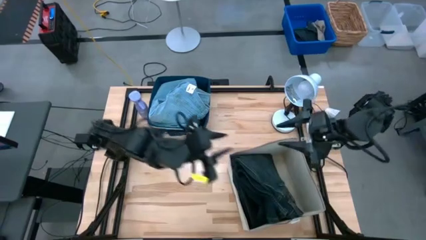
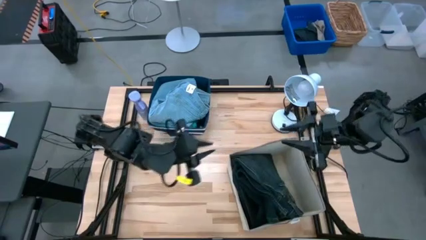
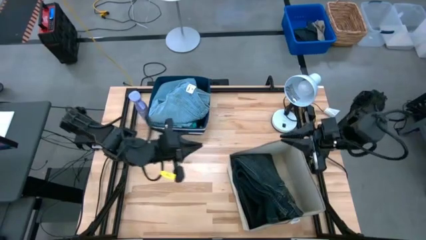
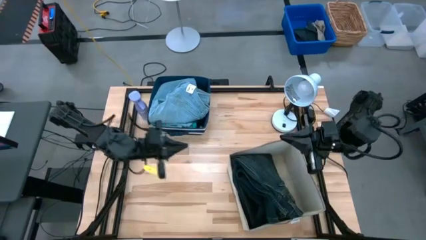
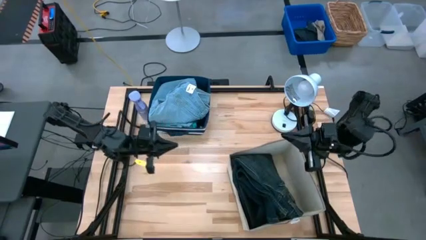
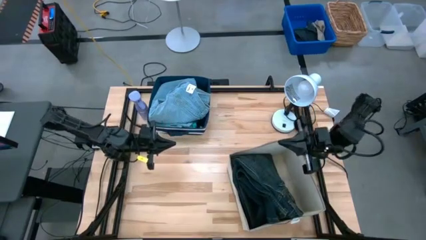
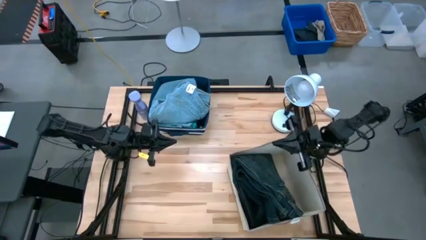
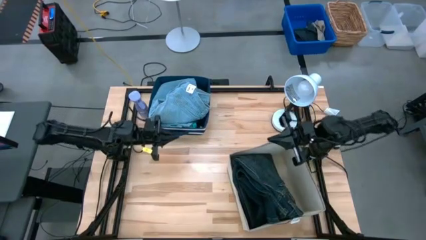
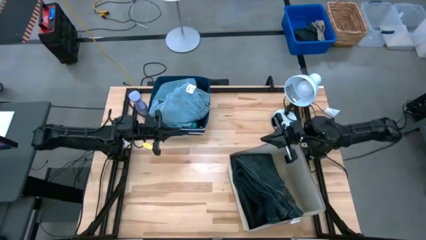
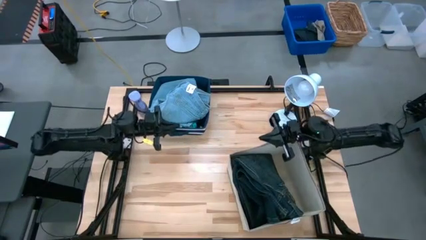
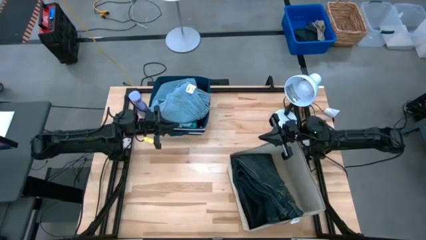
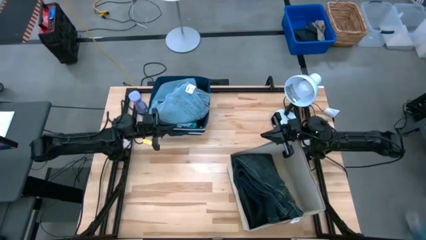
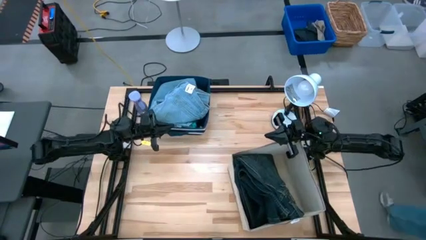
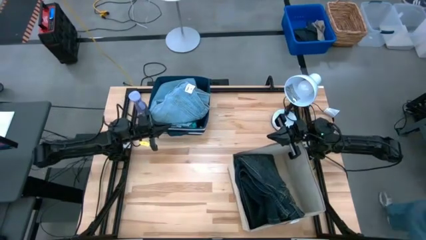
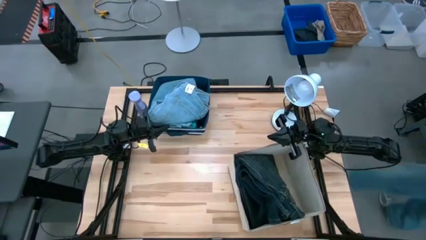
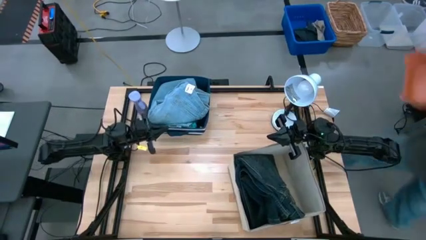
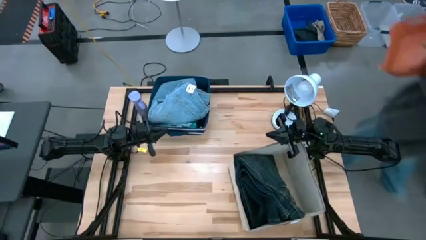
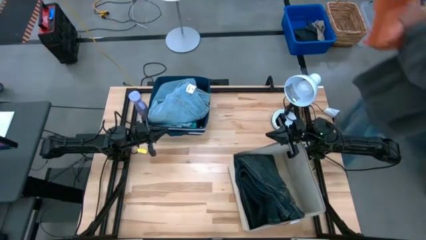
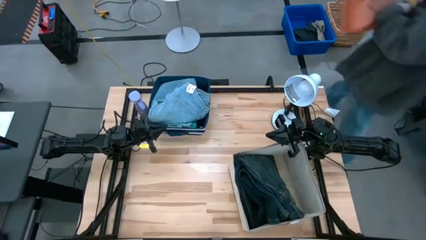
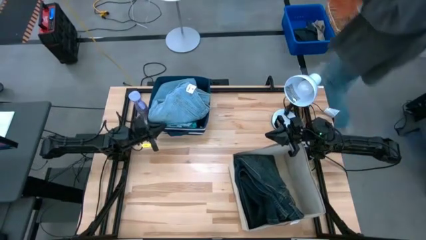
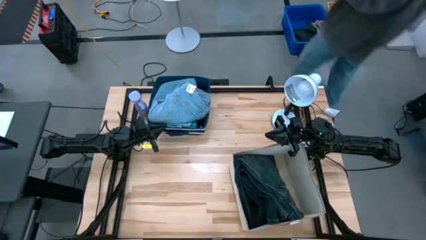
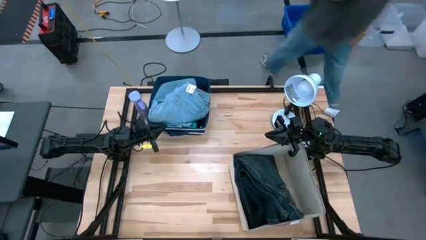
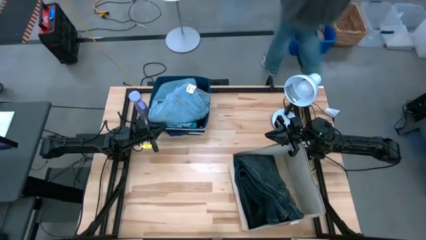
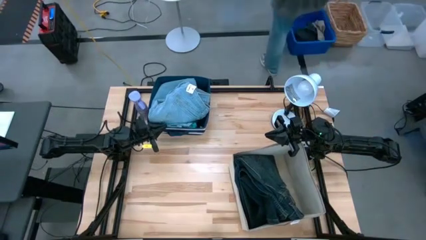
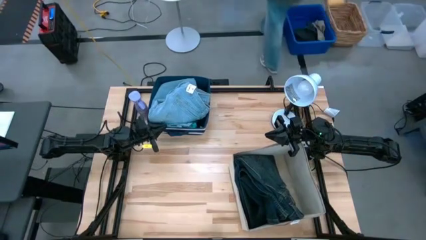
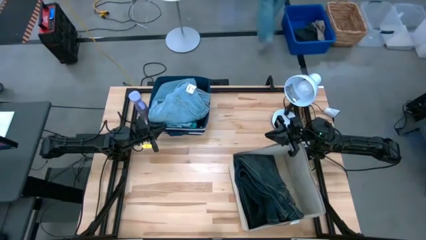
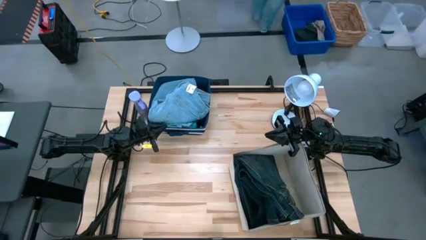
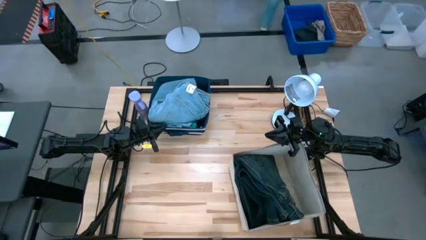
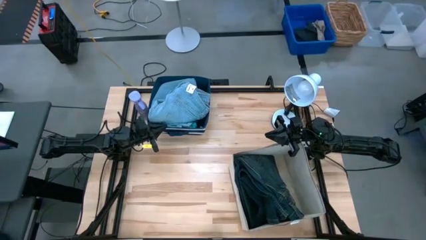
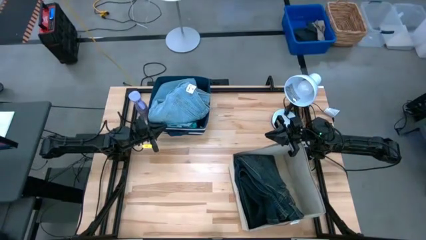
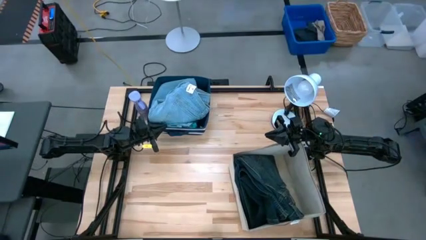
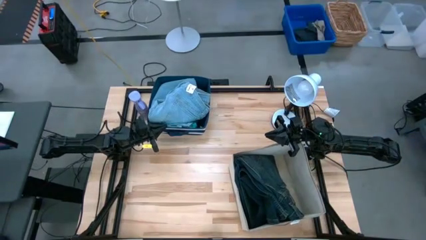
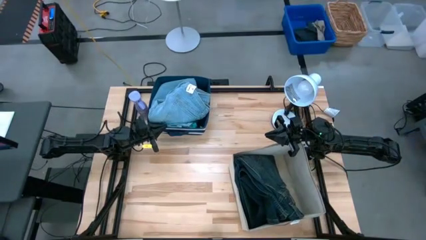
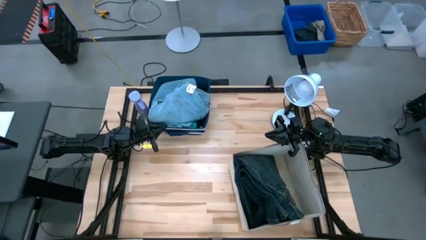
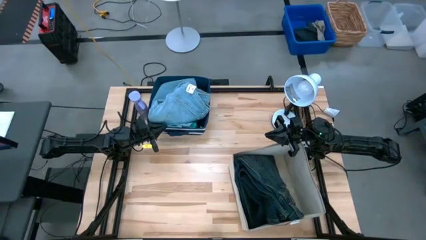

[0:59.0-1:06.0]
Task: Sort clothes
Return to Home Position

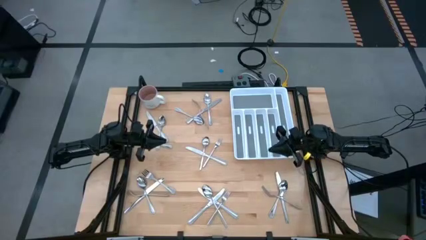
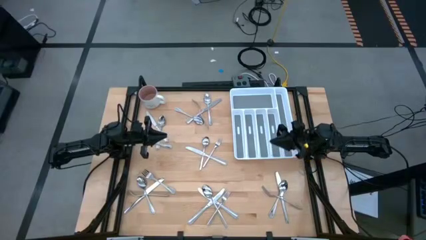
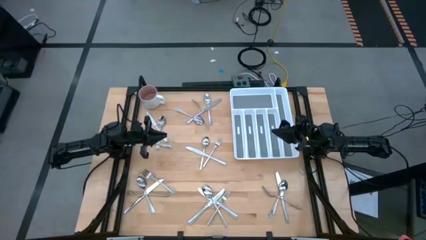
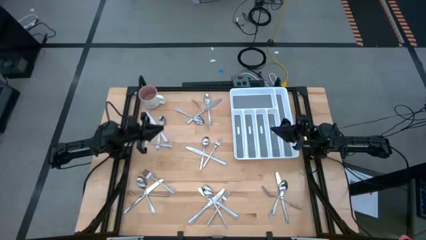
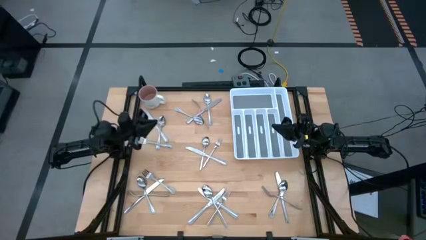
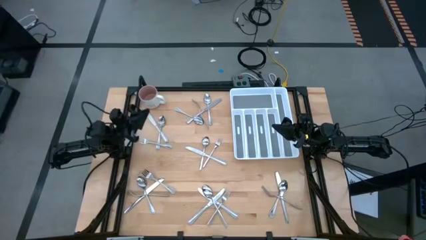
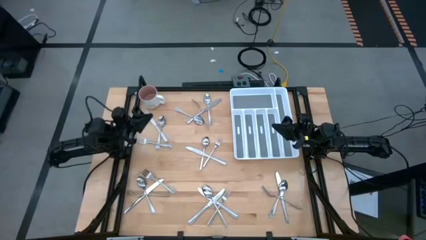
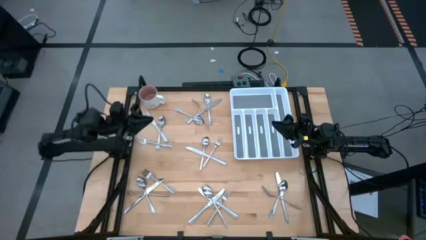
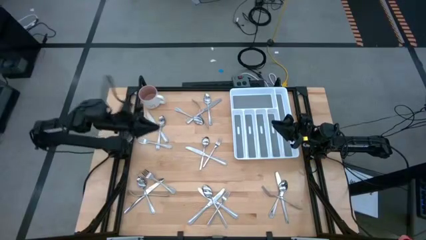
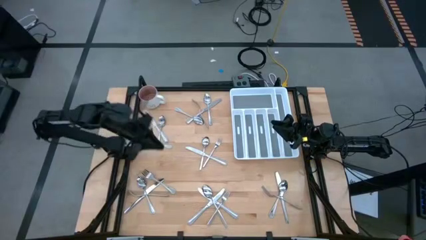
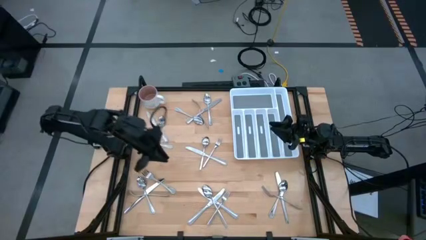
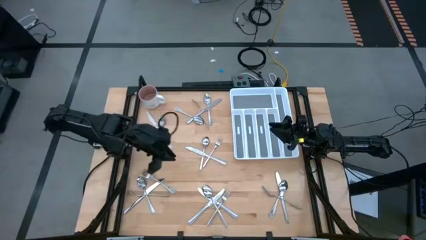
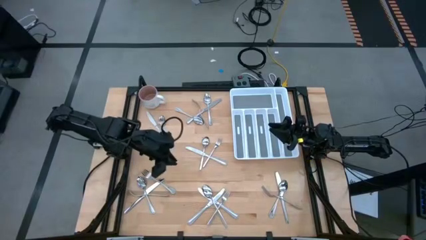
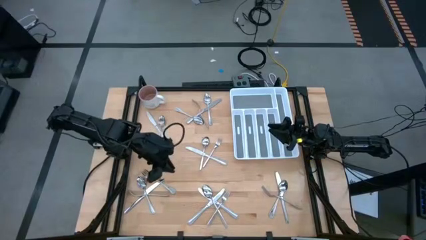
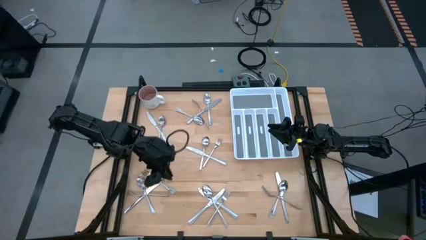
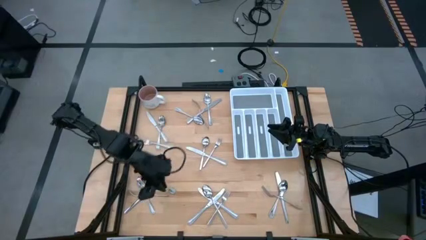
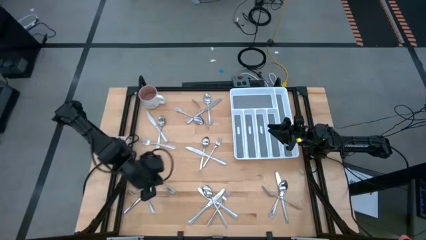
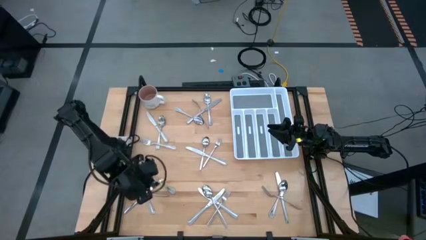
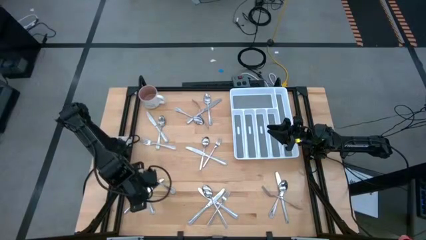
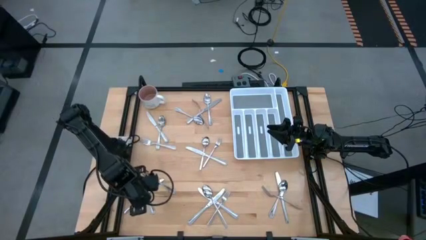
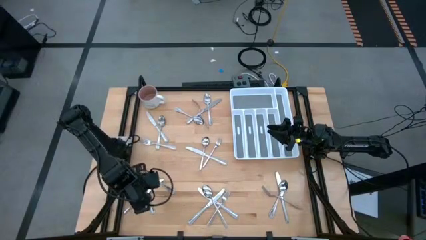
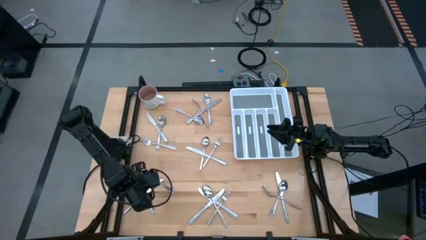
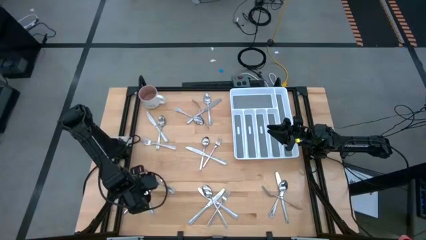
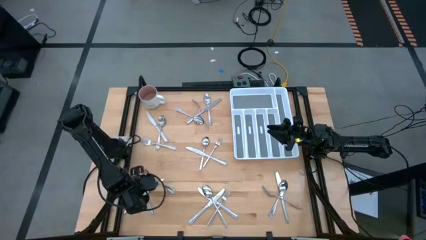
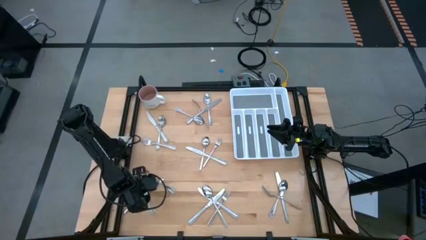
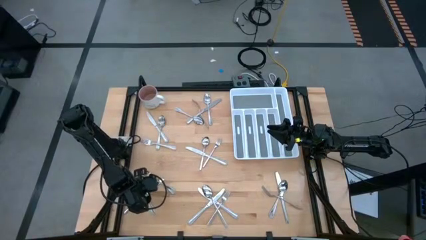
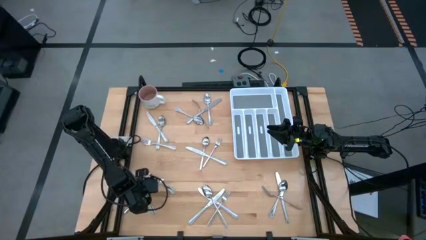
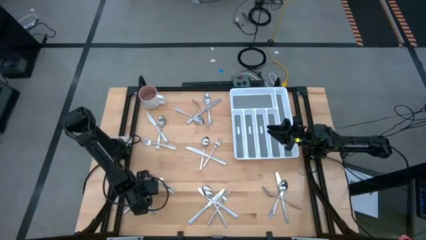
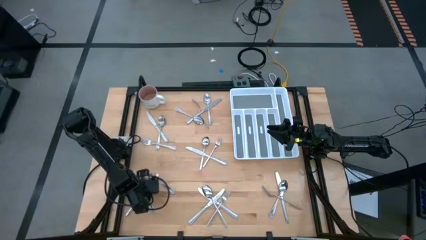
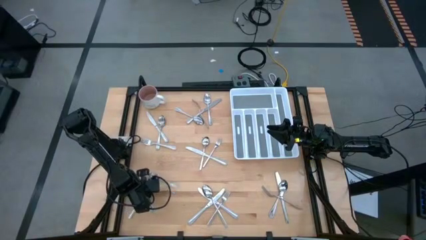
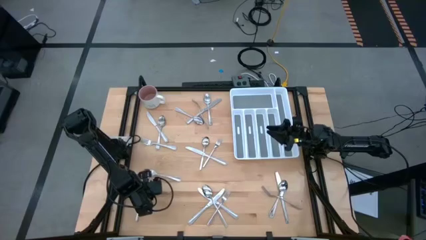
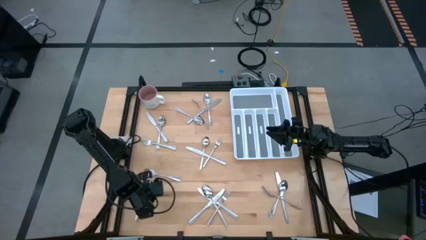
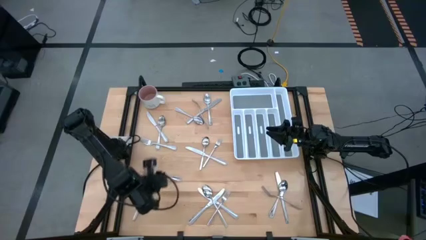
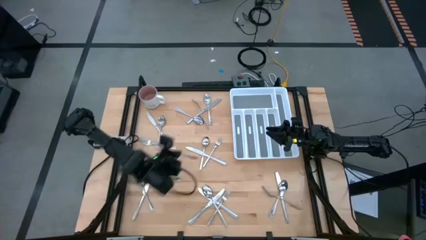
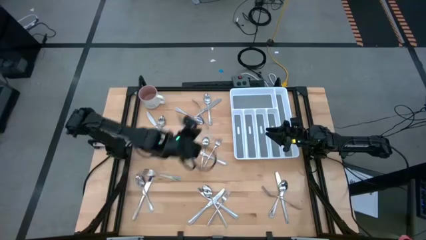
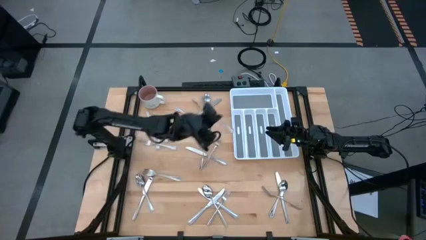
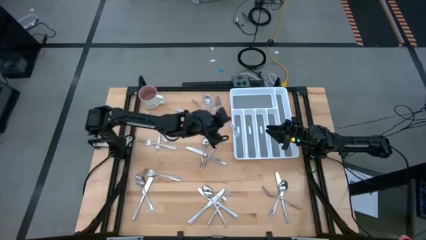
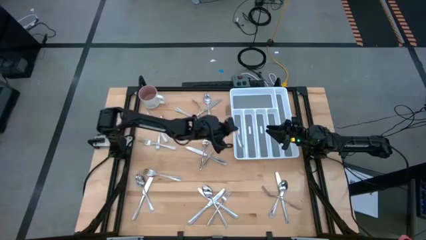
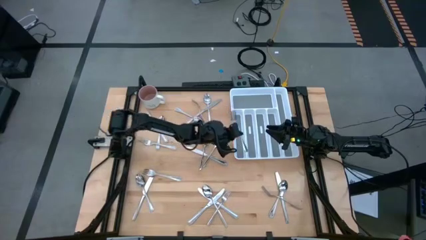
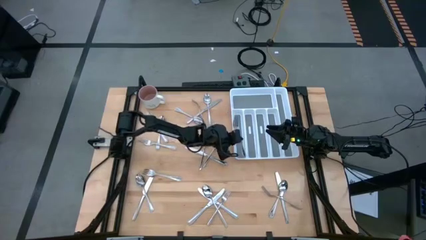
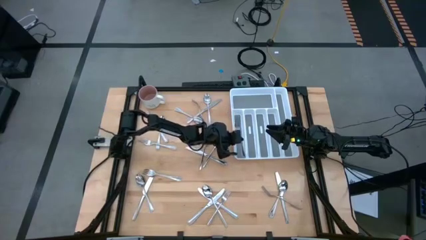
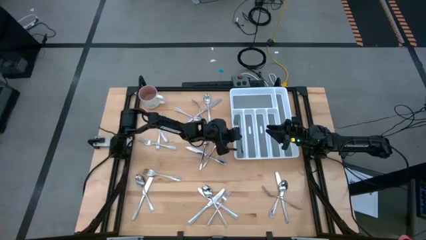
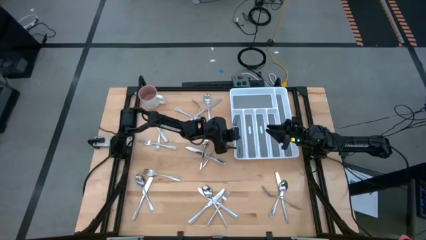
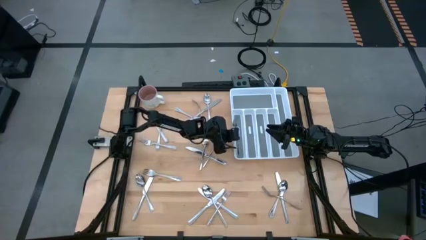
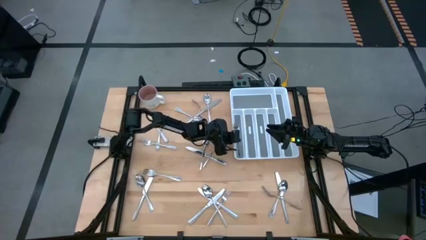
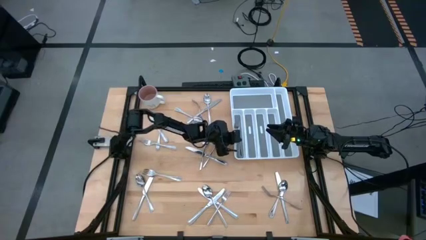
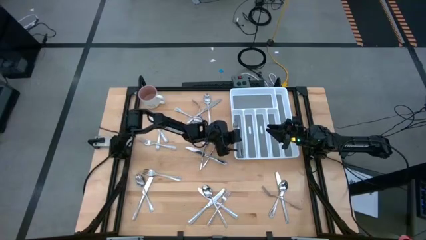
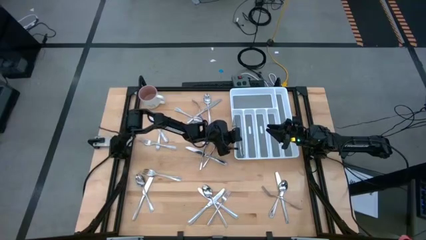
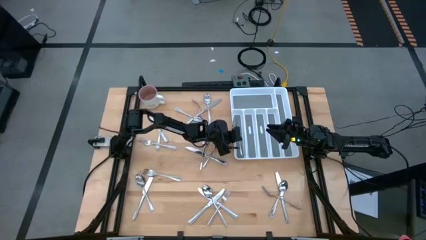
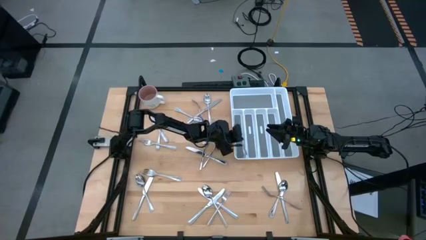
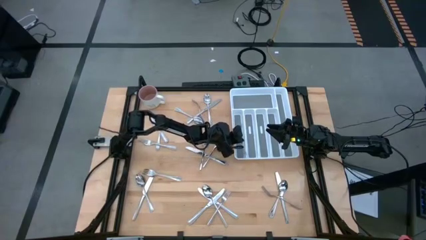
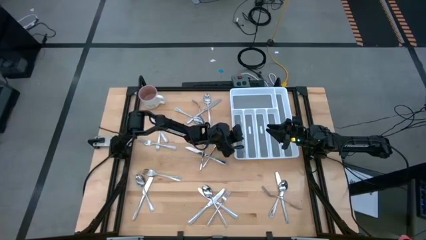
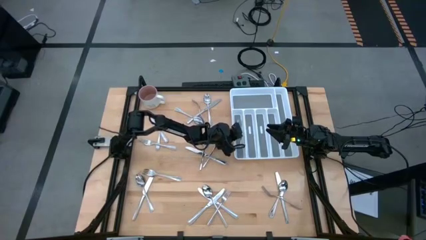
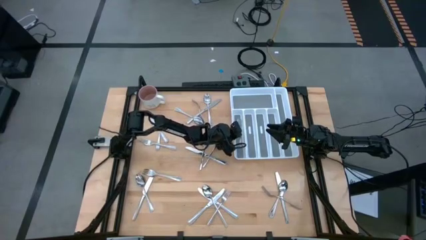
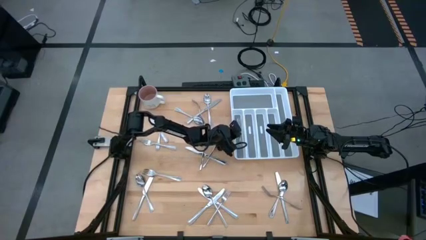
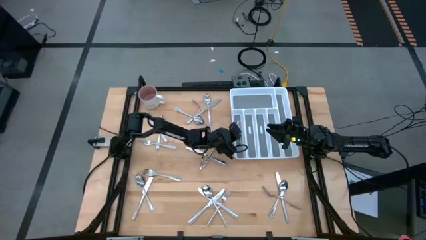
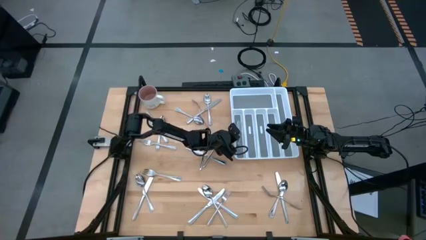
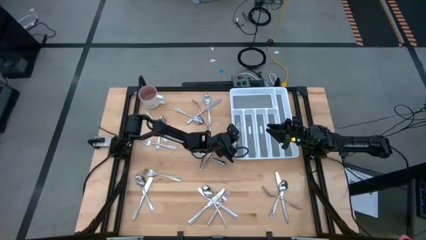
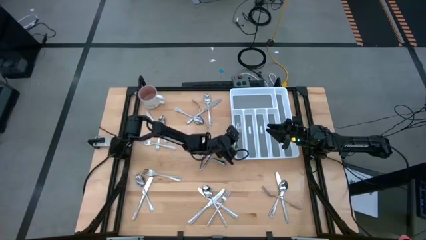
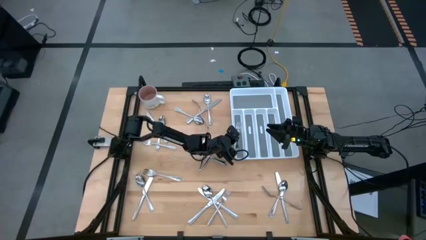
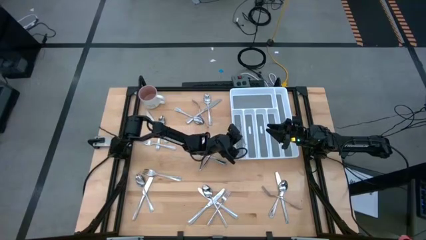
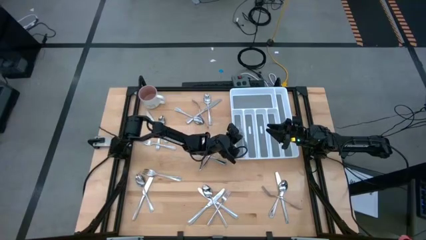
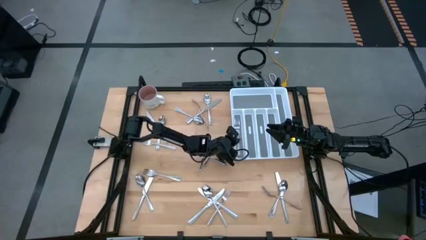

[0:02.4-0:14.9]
Task: Sort silverware
Put the silver fork into the silverware tray
